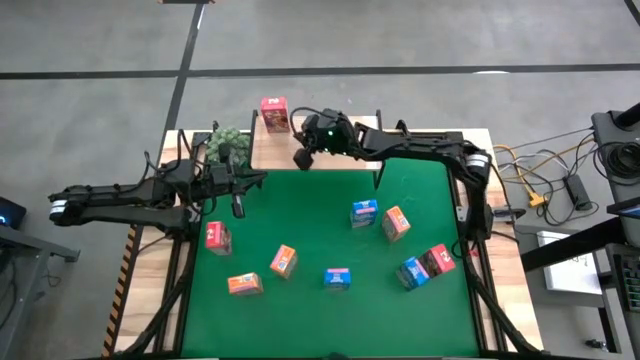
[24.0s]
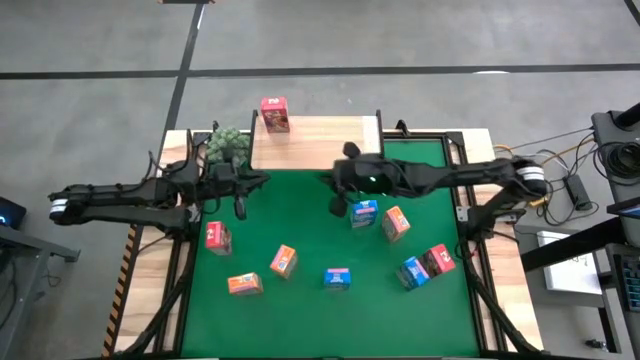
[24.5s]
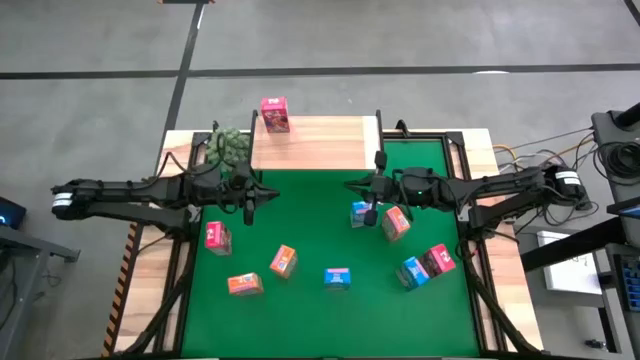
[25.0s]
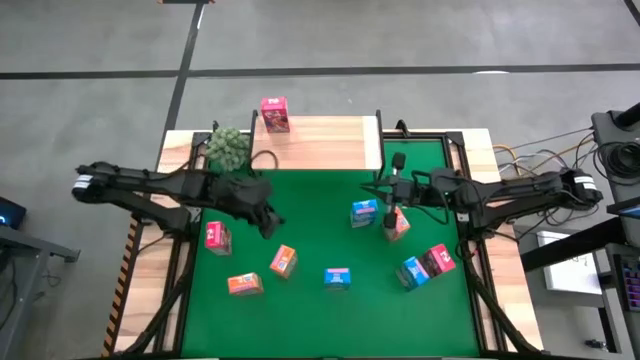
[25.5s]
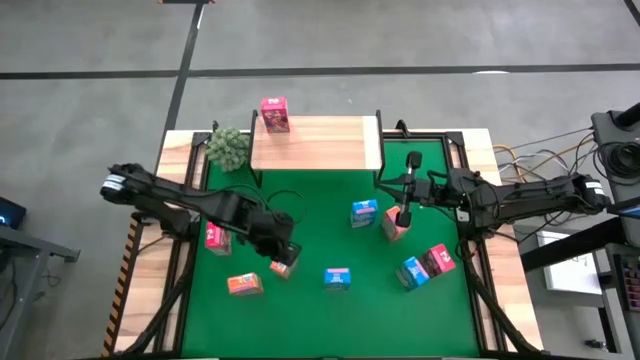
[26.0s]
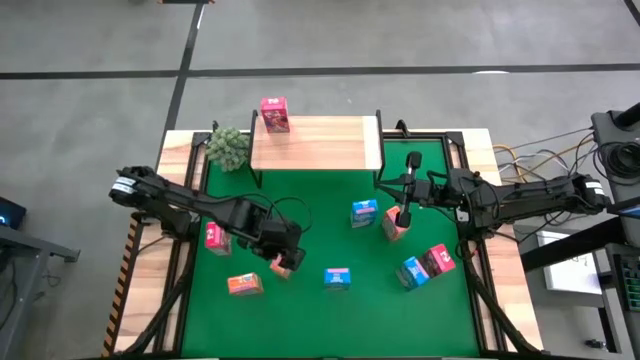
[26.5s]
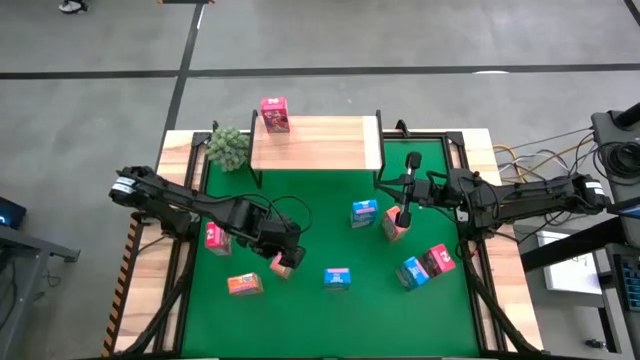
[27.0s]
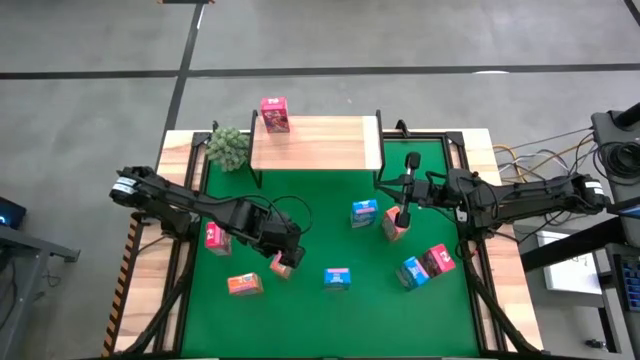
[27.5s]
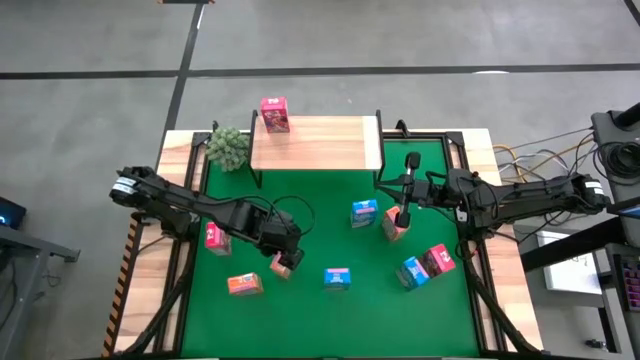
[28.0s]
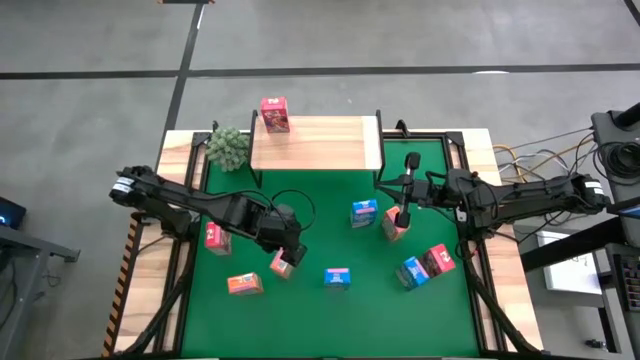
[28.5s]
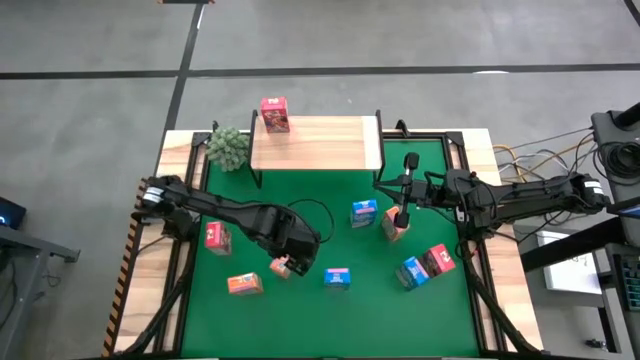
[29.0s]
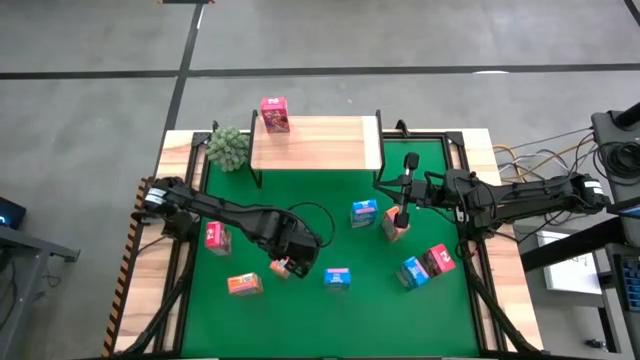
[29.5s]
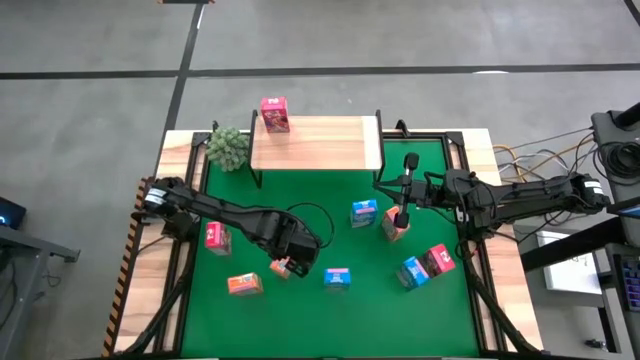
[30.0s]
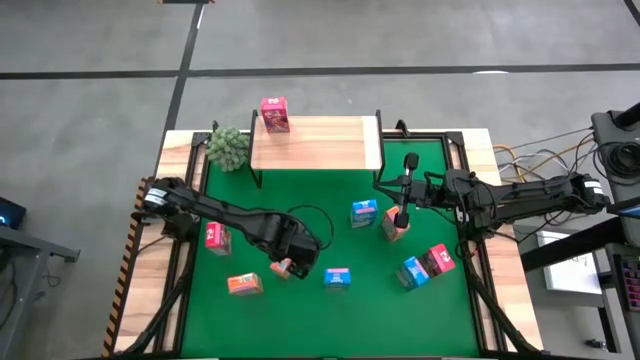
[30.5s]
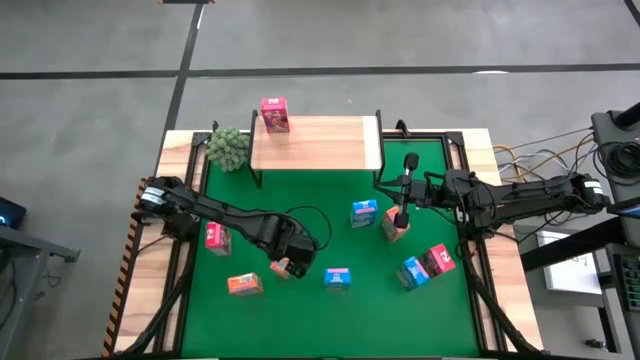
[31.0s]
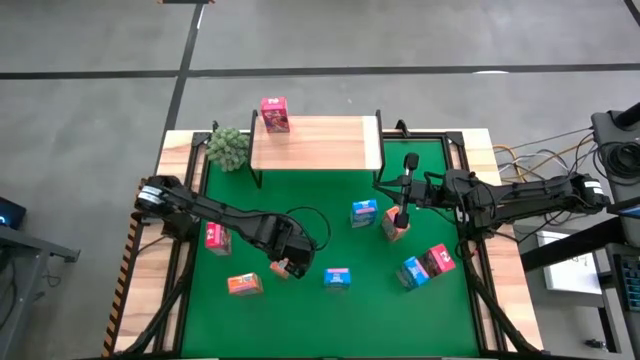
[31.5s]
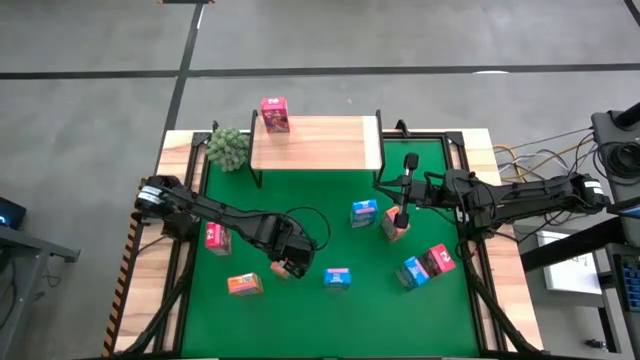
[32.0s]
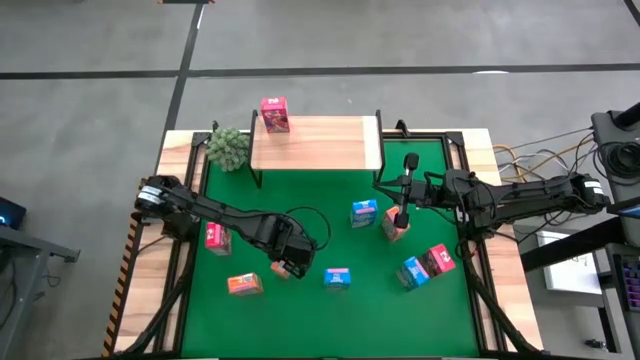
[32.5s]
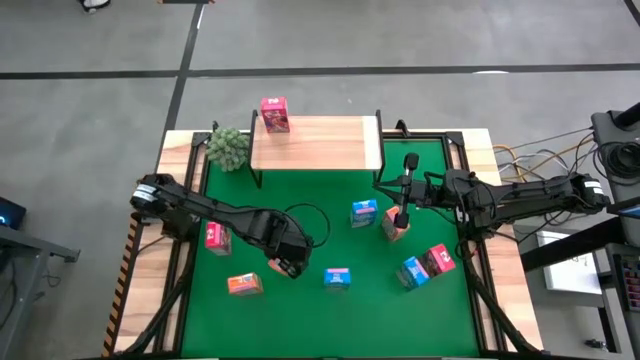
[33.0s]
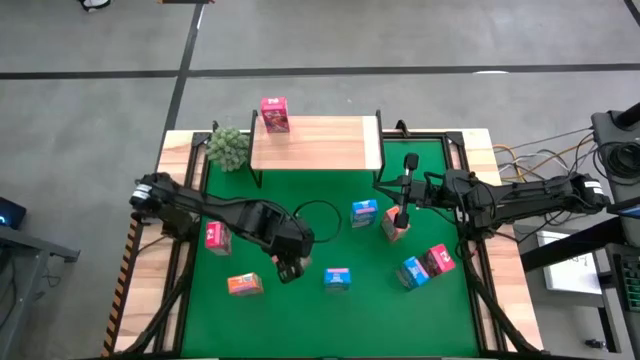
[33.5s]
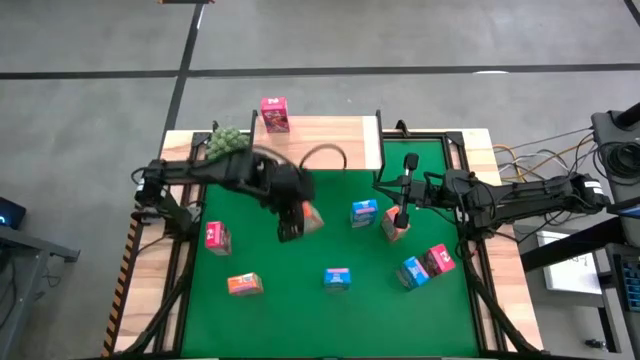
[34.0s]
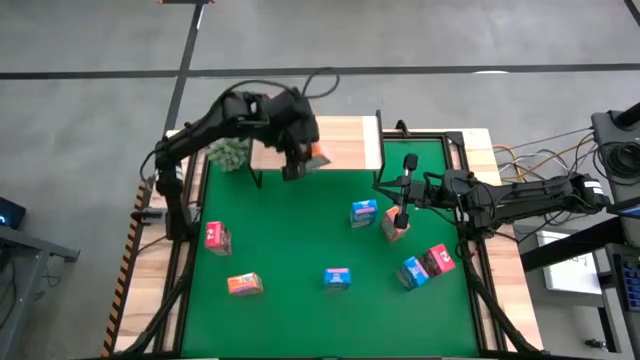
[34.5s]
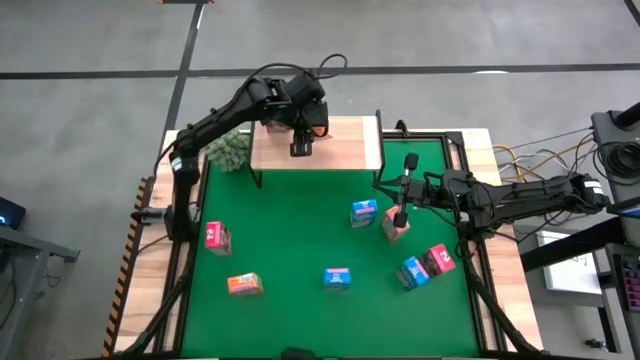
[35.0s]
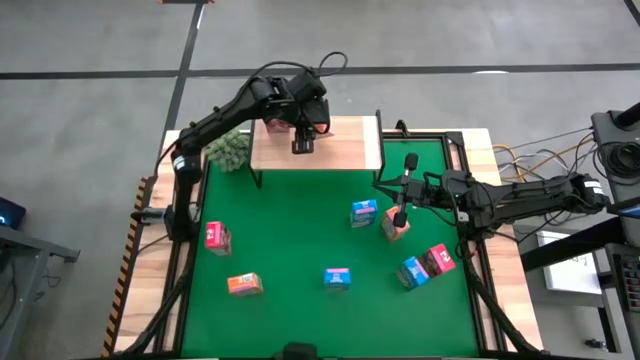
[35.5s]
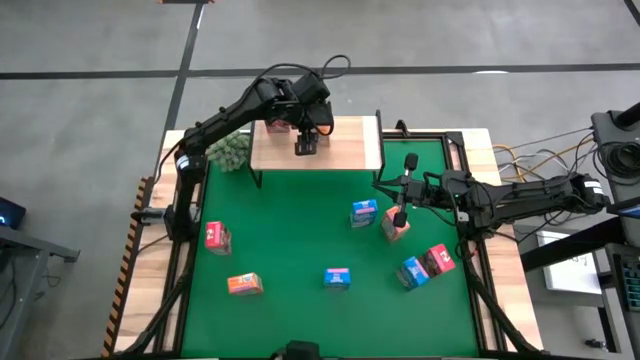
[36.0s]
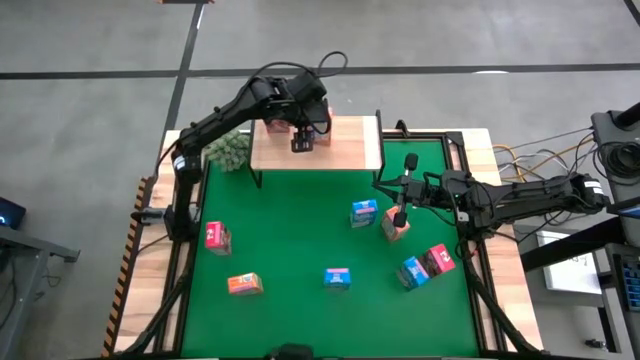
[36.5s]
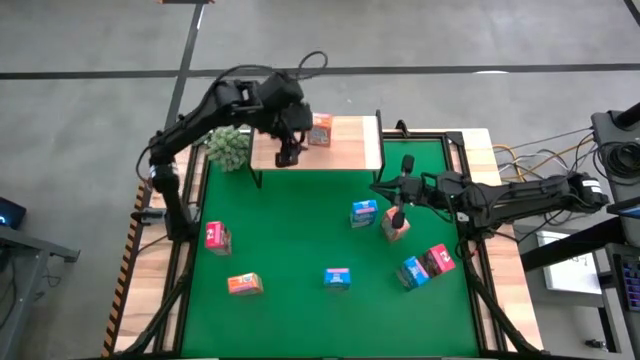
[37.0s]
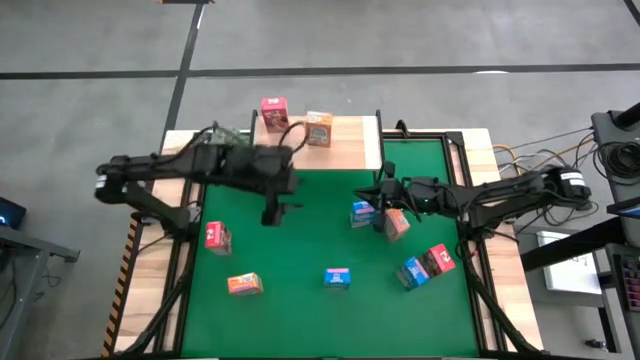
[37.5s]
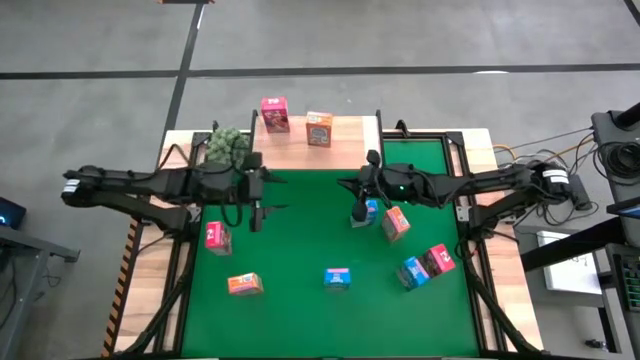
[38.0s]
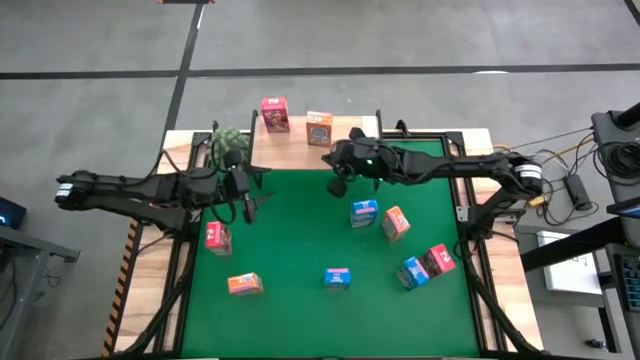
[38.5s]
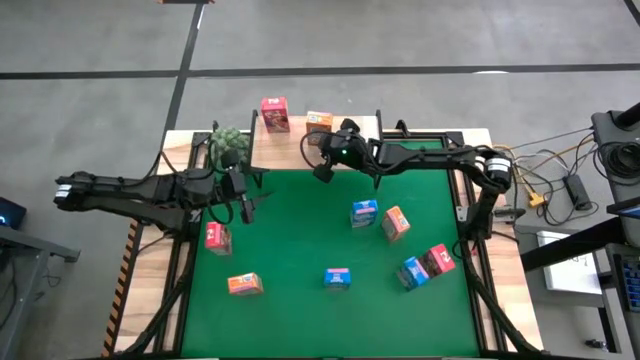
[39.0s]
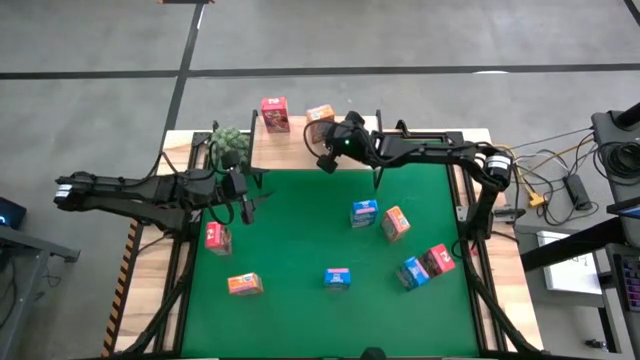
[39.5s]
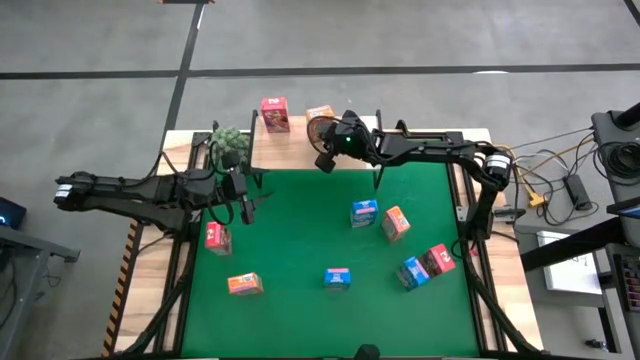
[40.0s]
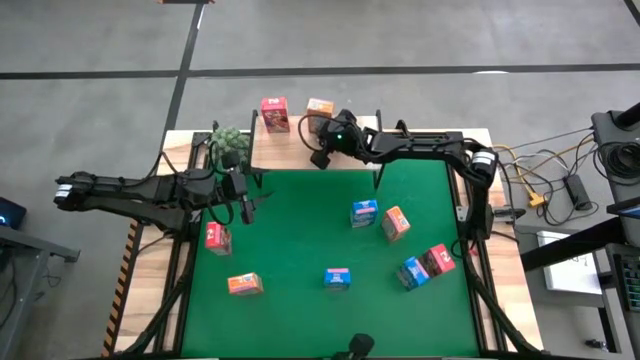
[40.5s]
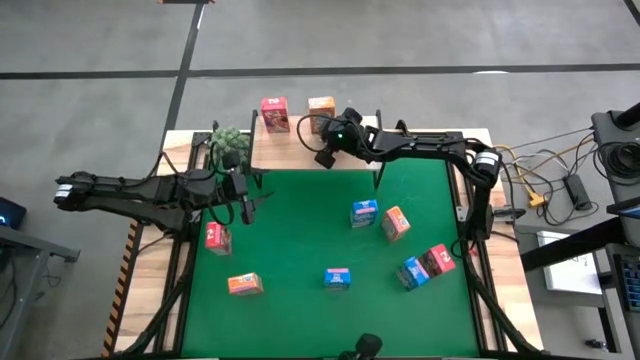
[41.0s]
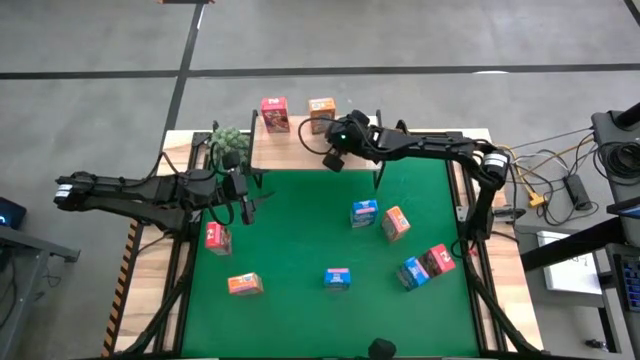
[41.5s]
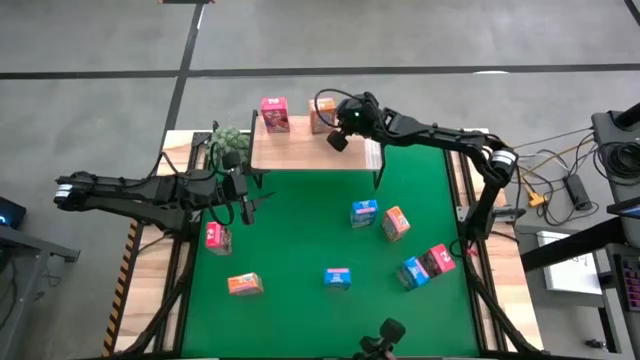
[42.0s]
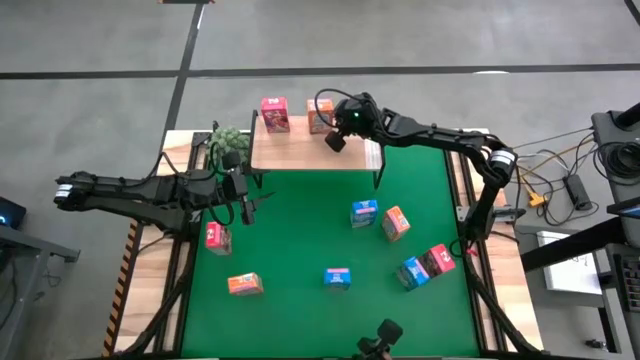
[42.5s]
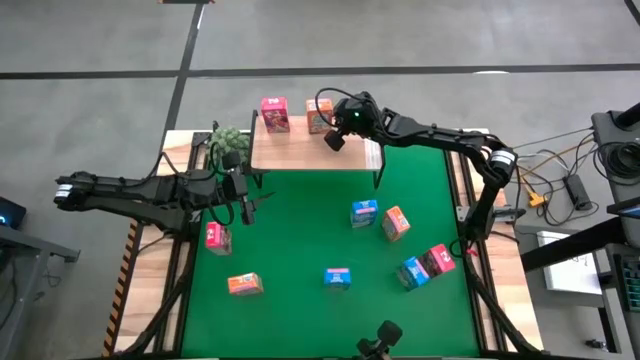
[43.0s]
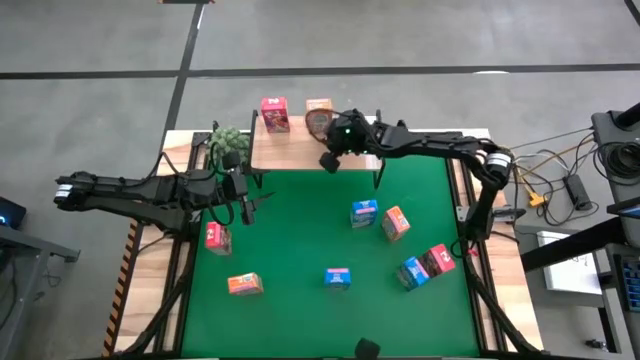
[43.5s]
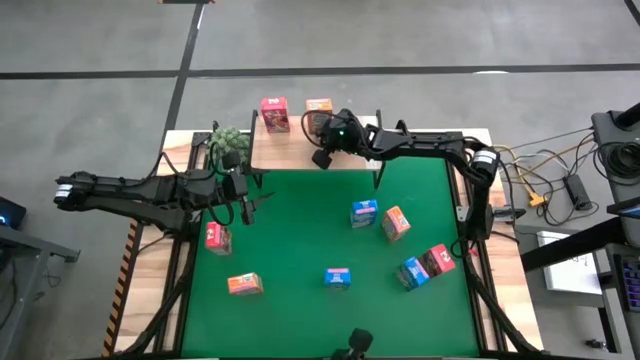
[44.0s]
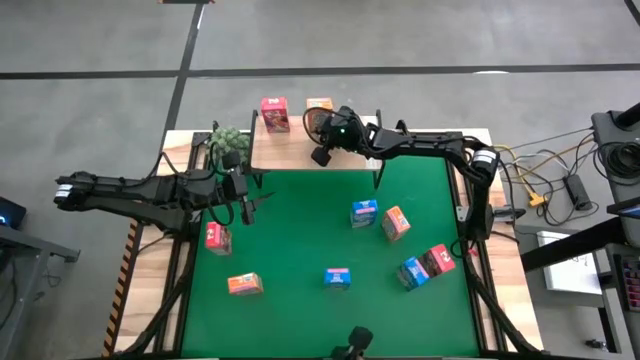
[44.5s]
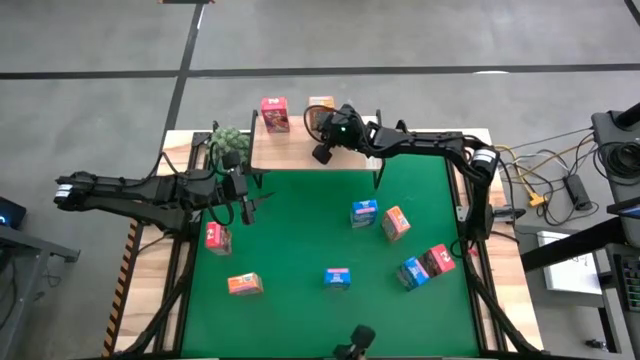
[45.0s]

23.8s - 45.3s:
Task: Stack cereal on shelf
Put the bottom left orange cereal box on the shelf

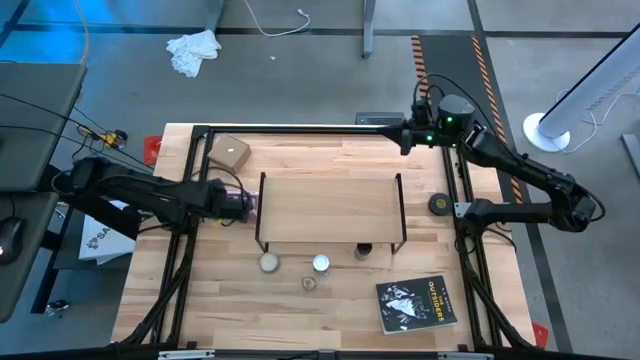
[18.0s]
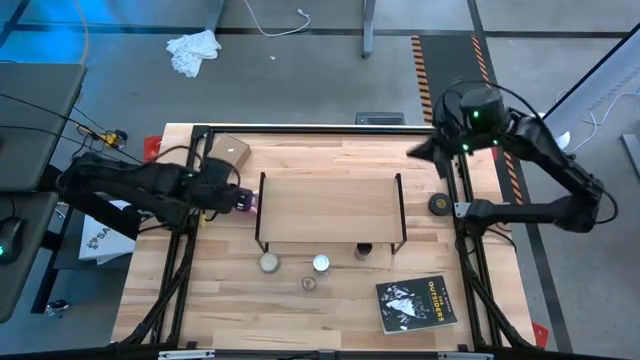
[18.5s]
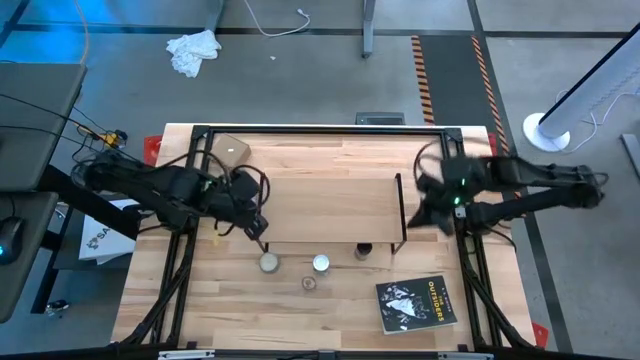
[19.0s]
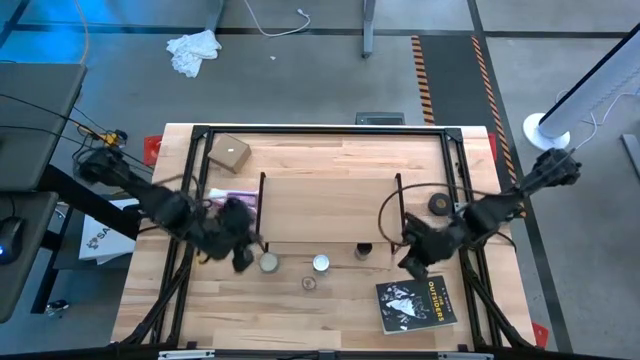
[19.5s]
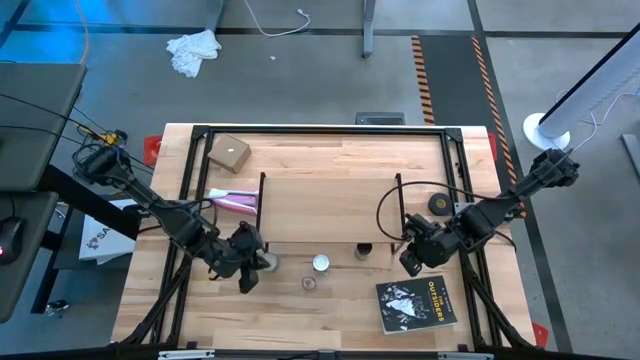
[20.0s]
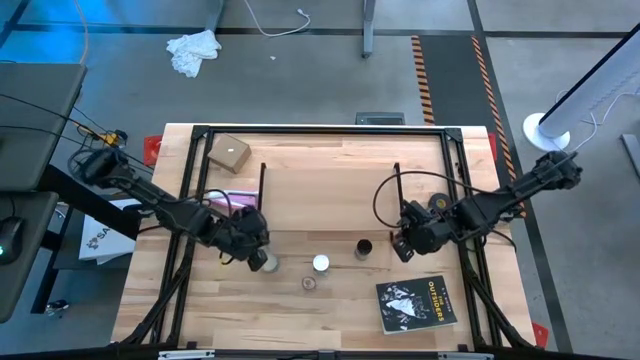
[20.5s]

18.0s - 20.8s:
Task: Shelf spices
Adjust the shelf on the table
